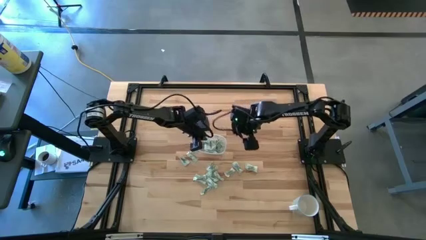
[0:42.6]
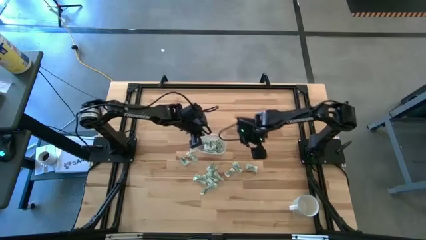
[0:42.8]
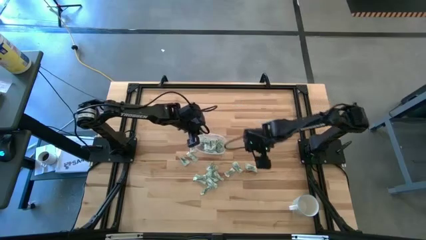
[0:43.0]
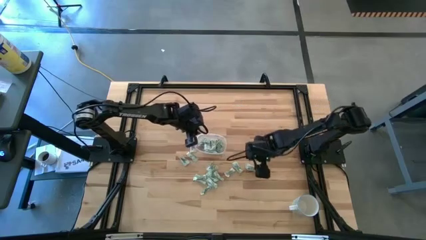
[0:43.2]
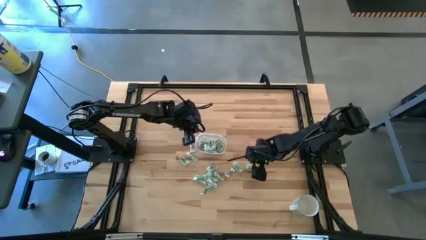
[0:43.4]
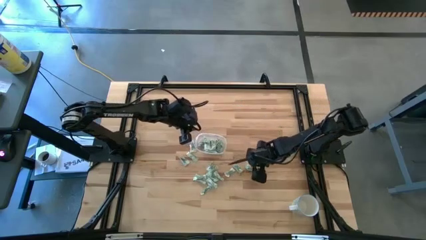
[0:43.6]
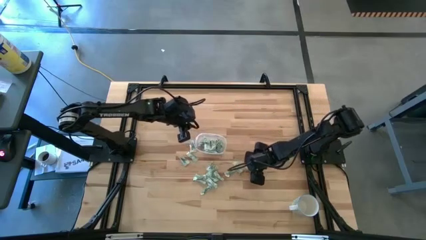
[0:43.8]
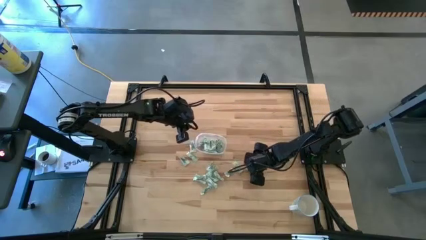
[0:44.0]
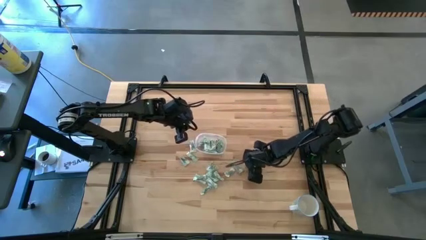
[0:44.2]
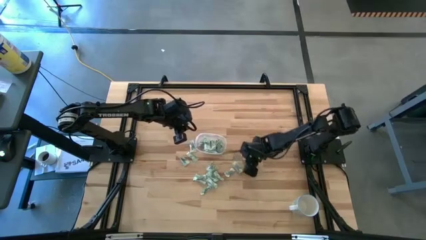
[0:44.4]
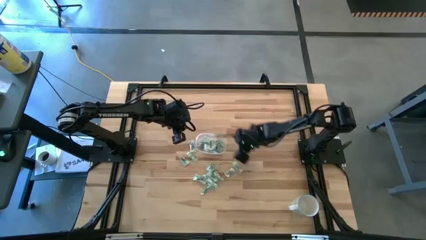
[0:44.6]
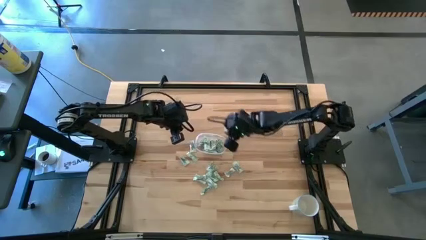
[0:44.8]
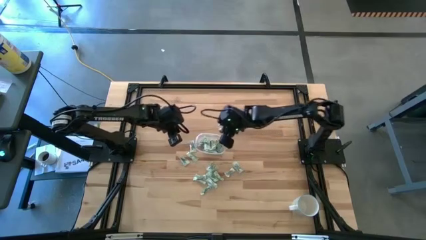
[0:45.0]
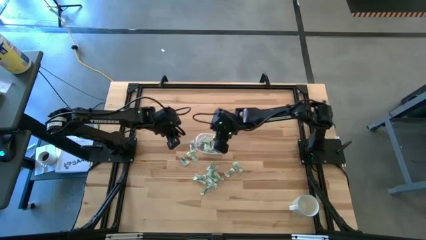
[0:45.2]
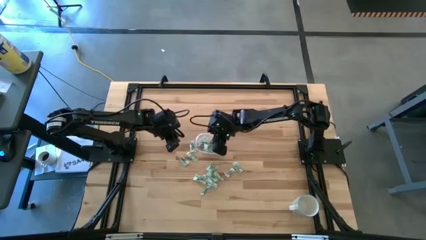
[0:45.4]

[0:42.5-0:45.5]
Task: Pick and place Stevia / Truvia into bins
Put the stevia packet into the transparent container

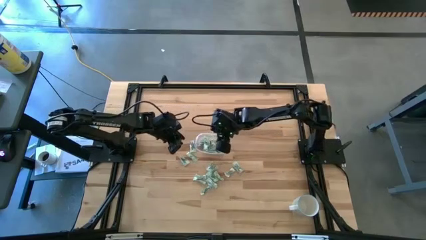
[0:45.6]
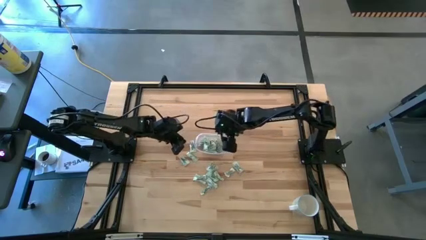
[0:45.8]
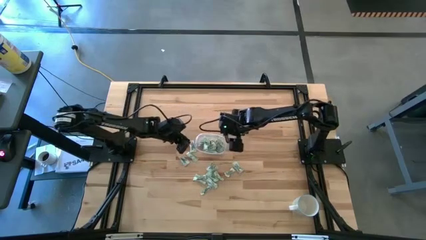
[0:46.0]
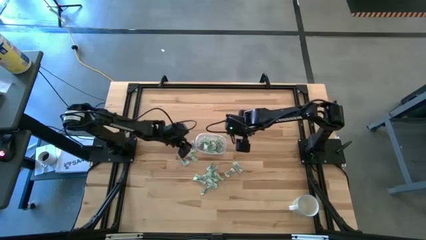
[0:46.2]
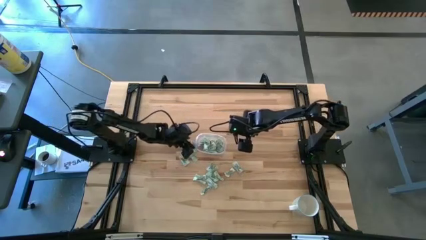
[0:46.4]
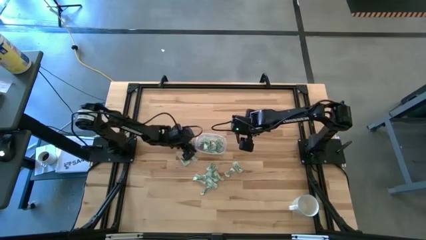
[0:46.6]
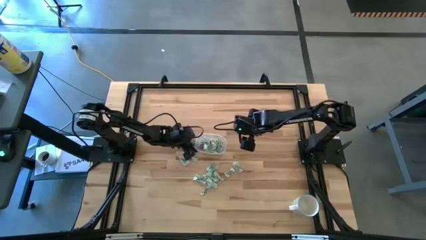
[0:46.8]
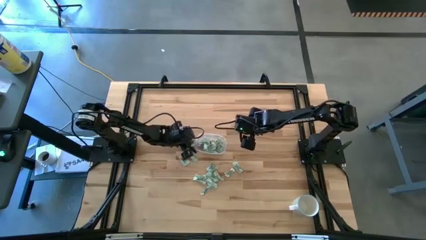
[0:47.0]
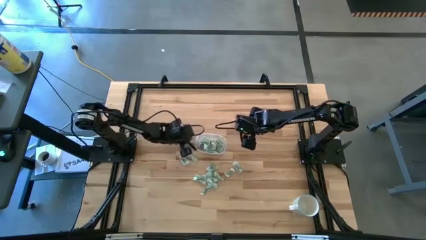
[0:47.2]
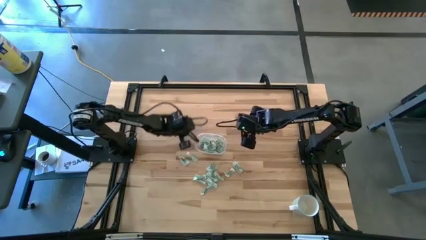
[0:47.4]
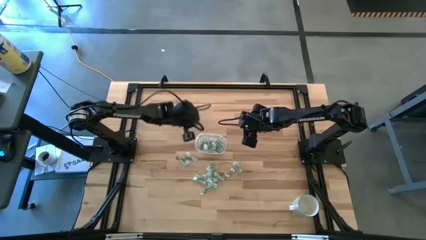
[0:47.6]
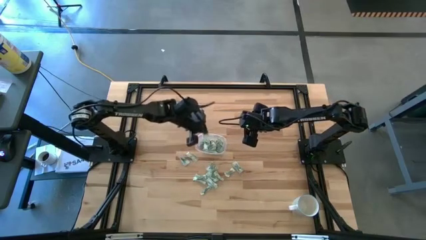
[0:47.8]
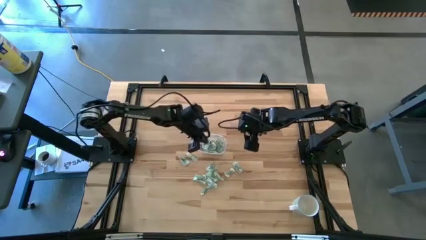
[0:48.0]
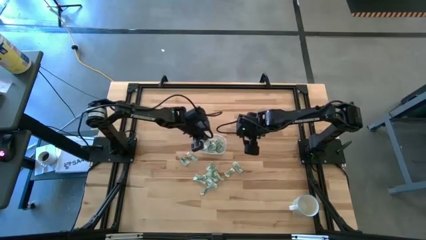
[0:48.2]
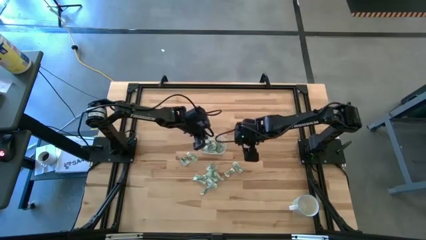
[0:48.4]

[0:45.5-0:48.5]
Put the stevia packet into the transparent container

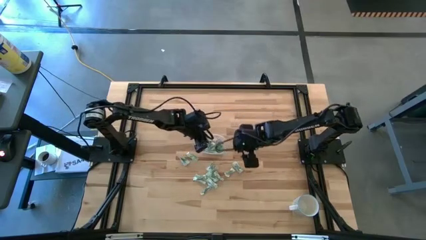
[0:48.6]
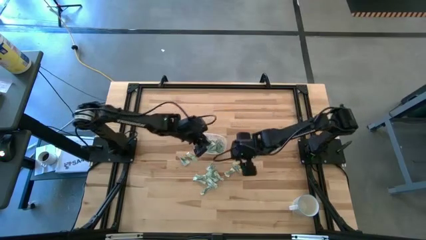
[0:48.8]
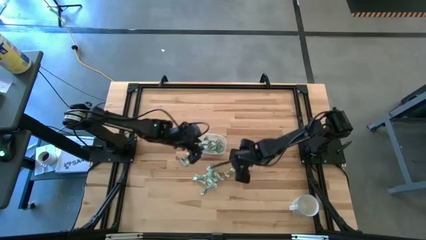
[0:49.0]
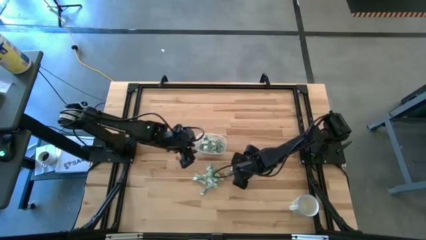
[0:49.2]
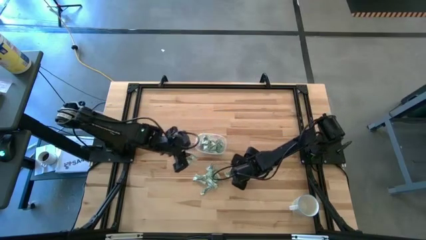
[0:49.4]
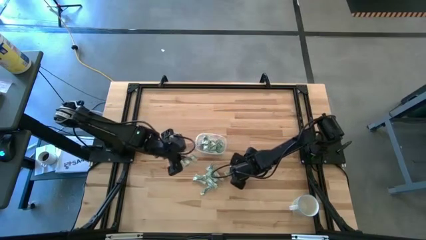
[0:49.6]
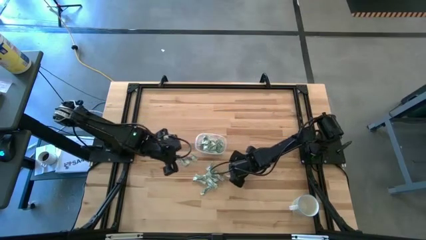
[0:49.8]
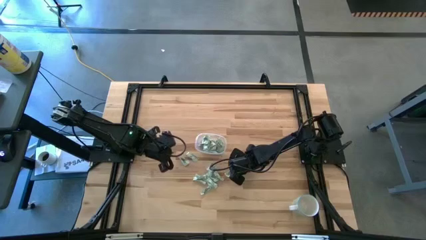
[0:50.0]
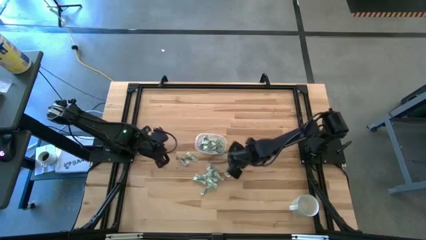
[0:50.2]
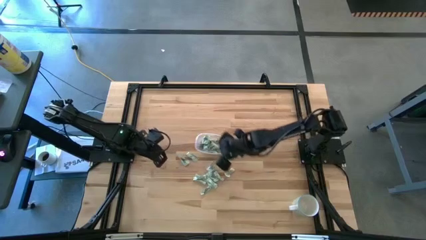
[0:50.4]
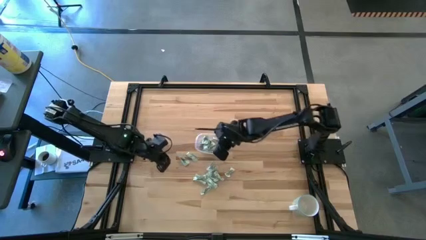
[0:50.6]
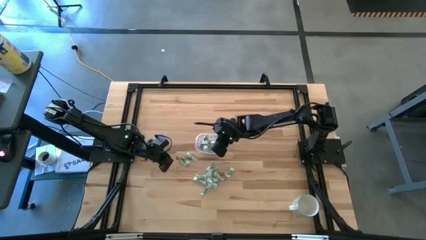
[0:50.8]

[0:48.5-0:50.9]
Put the stevia packet into the transparent container

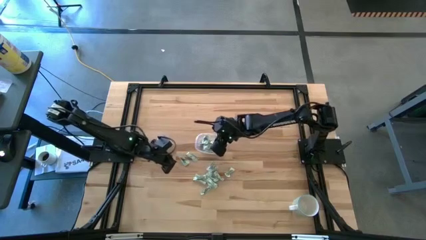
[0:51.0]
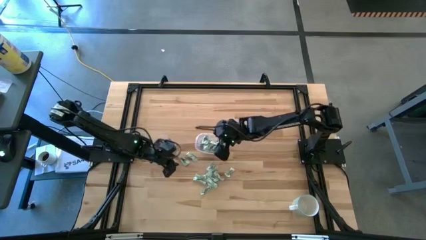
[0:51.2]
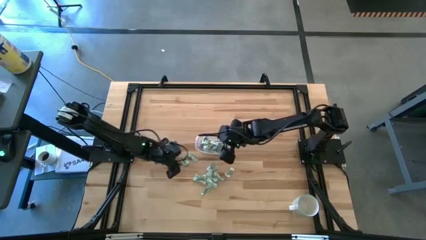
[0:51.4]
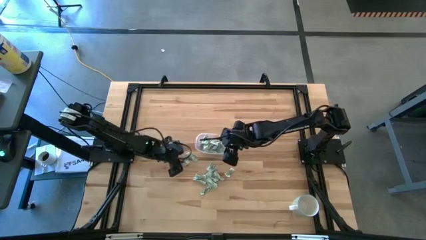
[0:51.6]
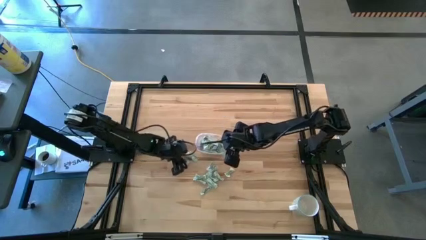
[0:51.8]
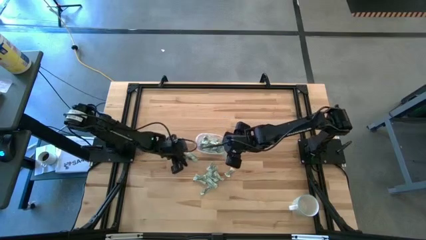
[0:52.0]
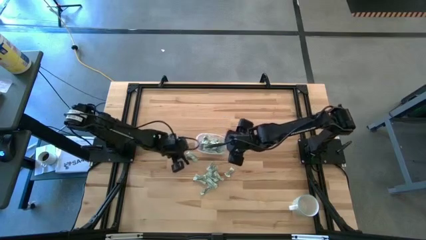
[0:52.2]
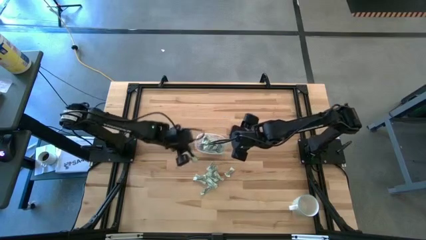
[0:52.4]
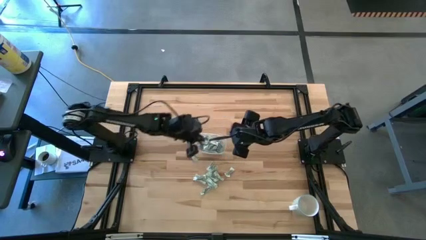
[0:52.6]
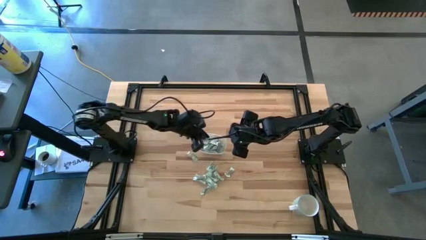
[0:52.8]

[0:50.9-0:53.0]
Put the stevia packet into the transparent container

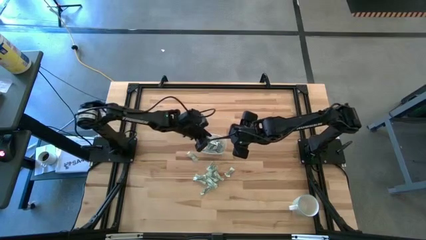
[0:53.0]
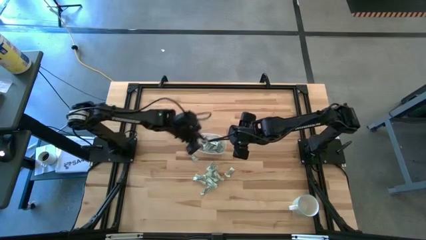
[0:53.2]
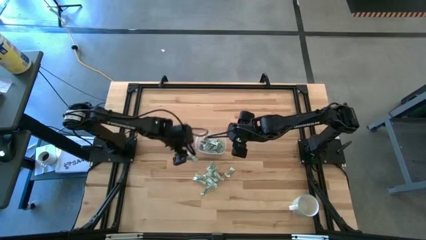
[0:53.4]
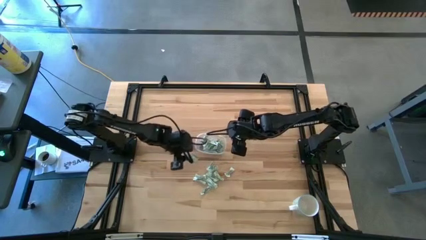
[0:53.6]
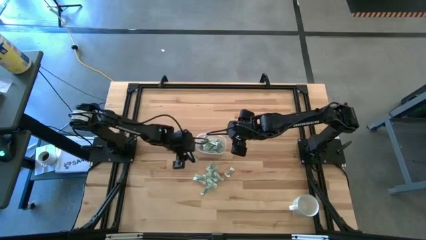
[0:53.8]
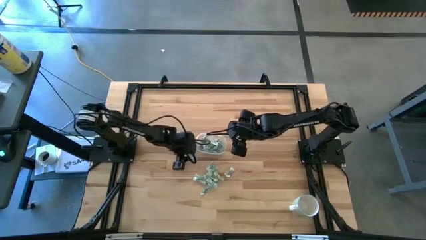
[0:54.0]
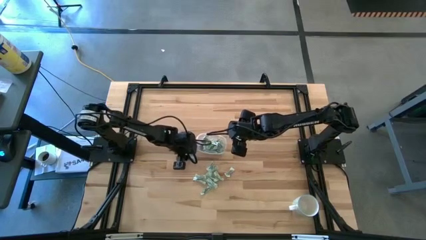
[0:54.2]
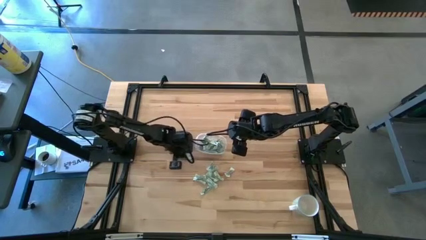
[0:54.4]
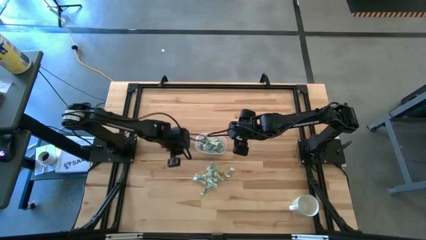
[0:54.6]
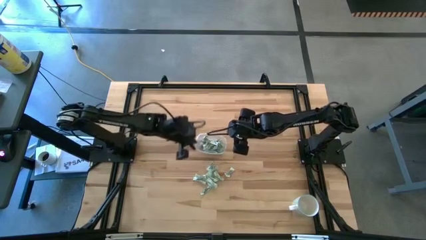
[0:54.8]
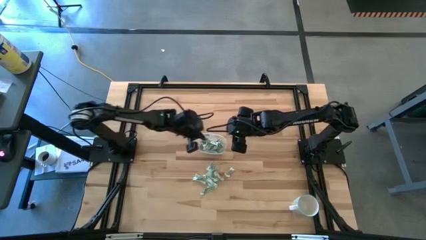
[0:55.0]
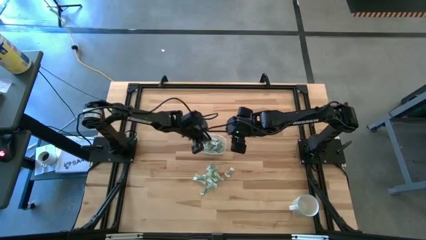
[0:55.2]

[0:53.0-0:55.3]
Put the stevia packet into the transparent container

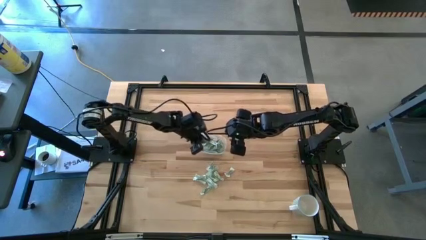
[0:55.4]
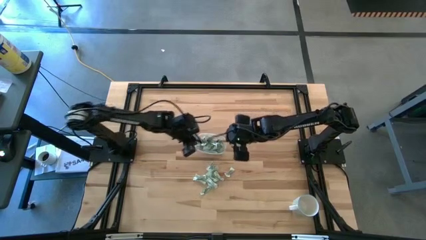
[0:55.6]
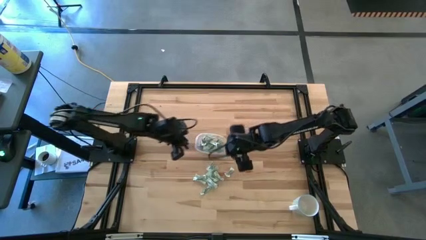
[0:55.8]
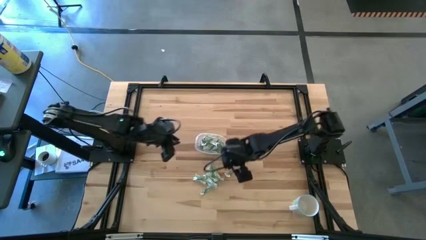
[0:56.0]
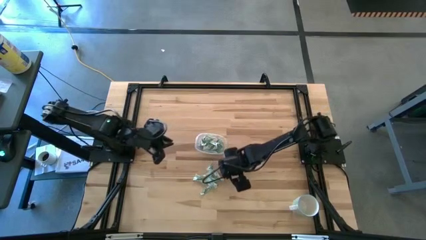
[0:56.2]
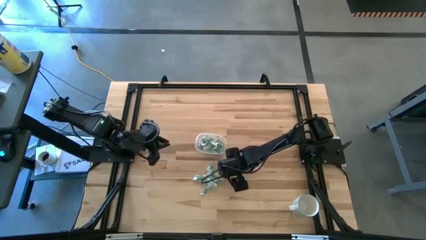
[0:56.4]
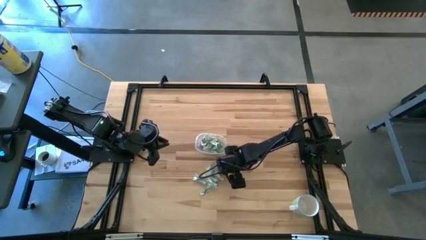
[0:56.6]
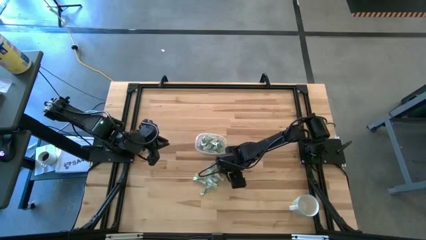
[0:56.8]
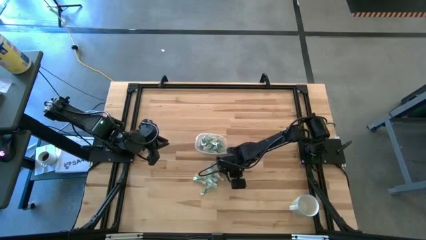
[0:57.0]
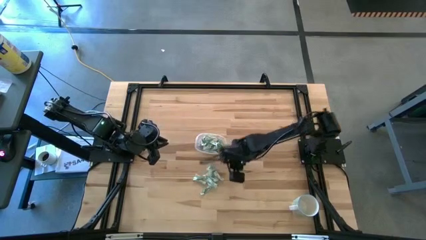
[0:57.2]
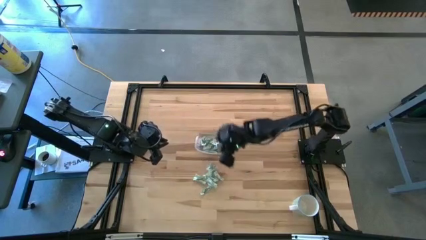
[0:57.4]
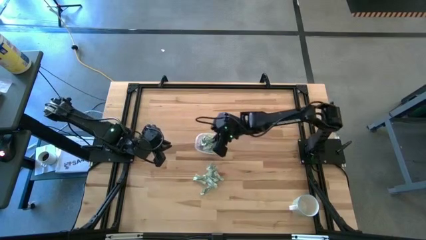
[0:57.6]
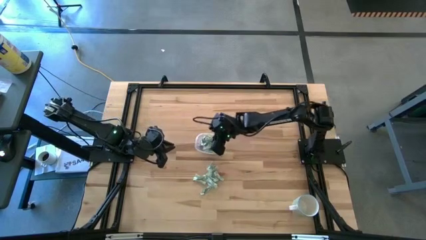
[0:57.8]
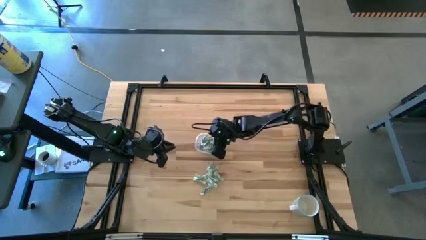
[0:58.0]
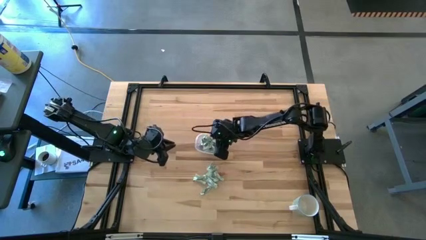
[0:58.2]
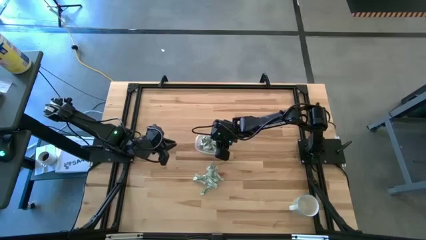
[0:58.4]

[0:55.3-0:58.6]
Put the stevia packet into the transparent container

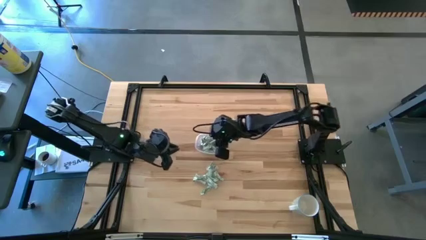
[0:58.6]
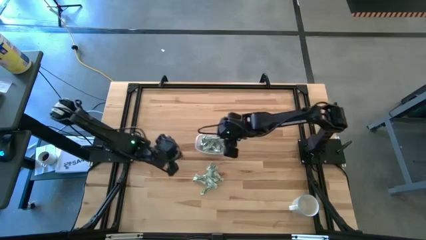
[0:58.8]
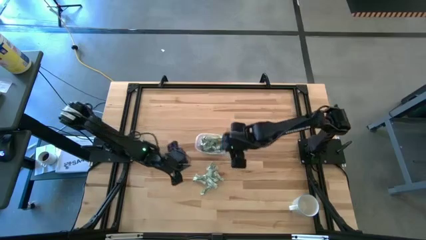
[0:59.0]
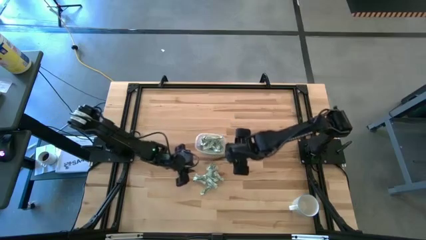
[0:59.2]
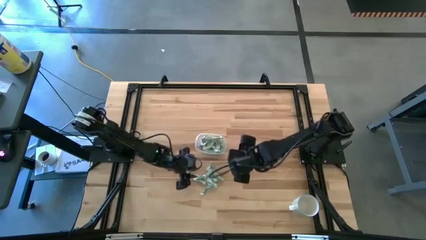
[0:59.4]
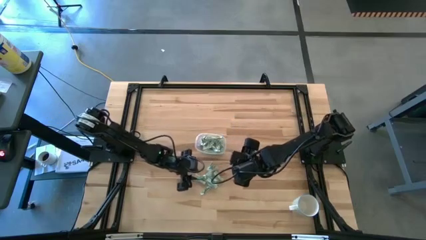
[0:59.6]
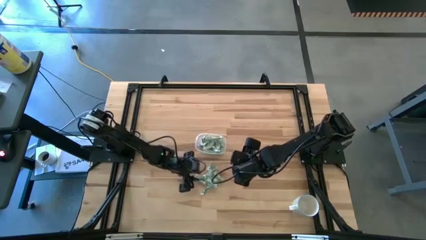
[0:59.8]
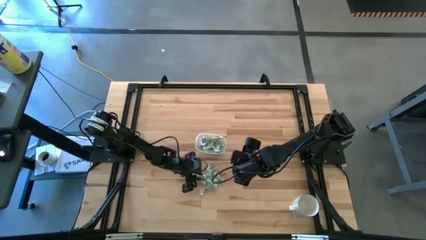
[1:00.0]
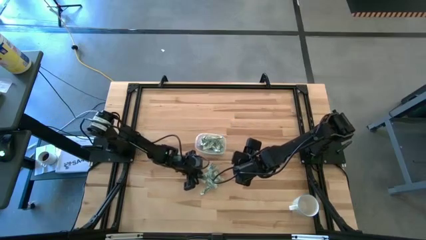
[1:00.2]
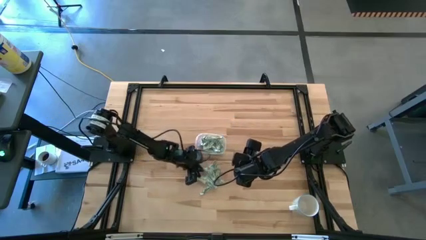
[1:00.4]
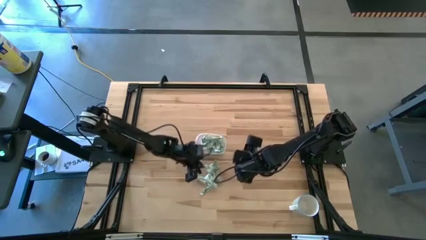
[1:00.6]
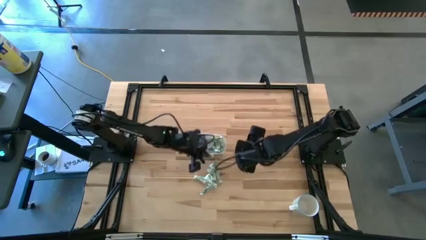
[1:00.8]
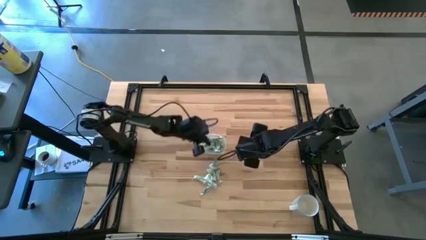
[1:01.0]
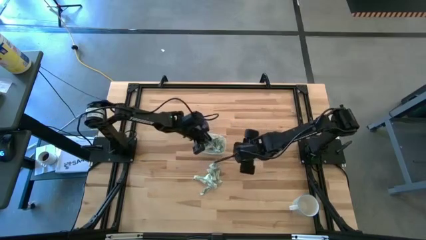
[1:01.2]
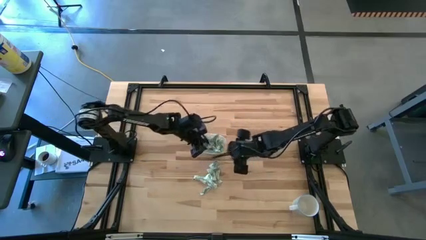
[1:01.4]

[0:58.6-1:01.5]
Put the stevia packet into the transparent container
